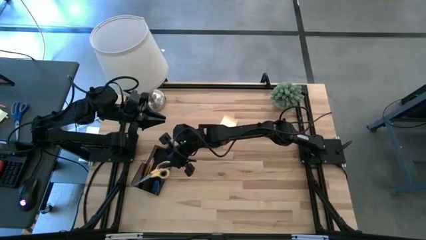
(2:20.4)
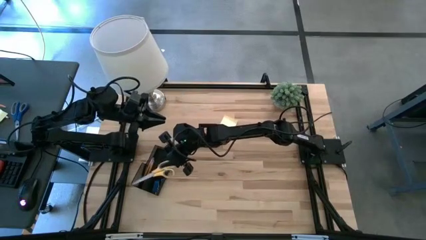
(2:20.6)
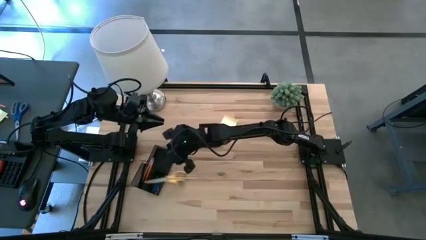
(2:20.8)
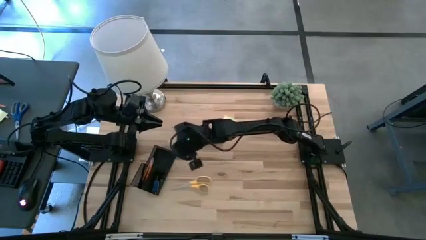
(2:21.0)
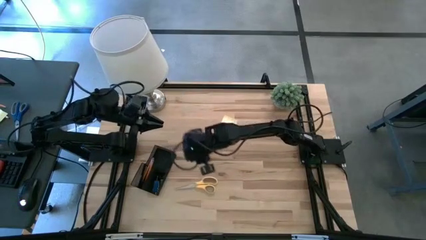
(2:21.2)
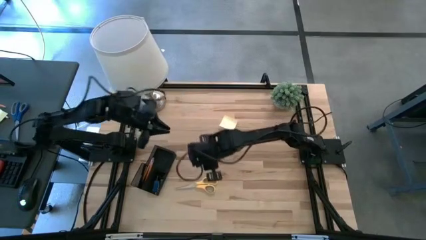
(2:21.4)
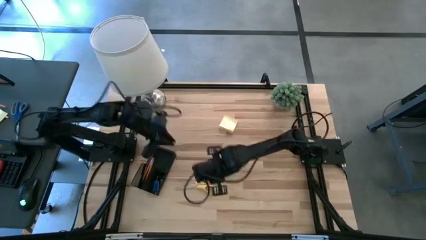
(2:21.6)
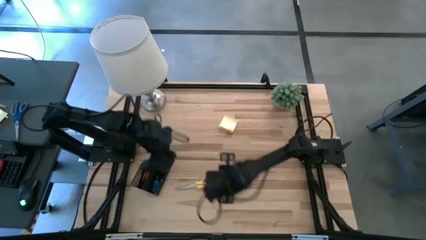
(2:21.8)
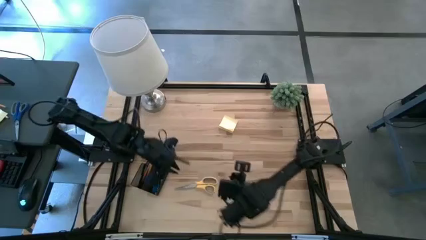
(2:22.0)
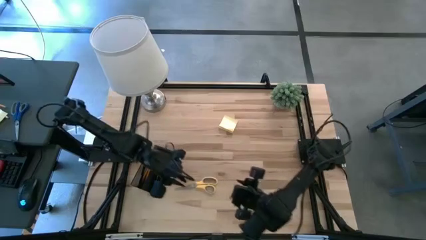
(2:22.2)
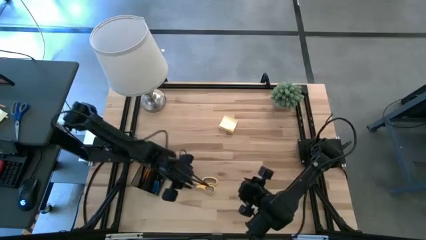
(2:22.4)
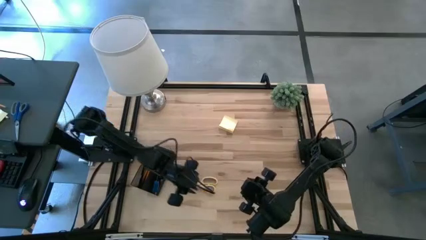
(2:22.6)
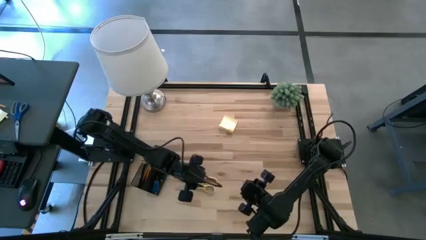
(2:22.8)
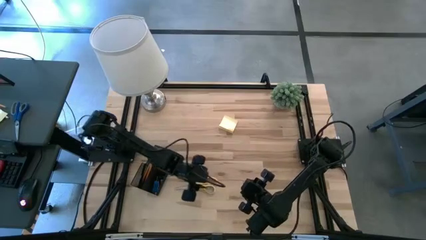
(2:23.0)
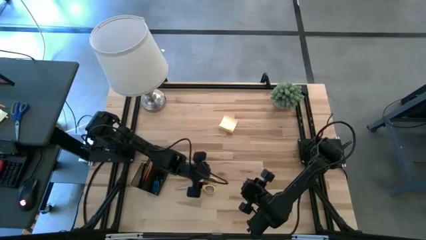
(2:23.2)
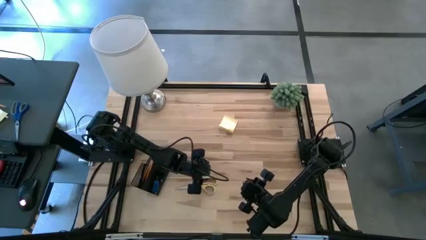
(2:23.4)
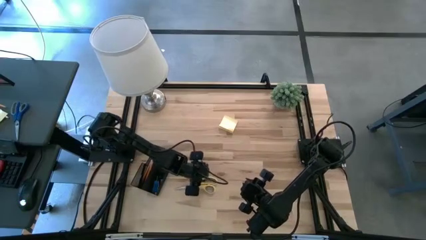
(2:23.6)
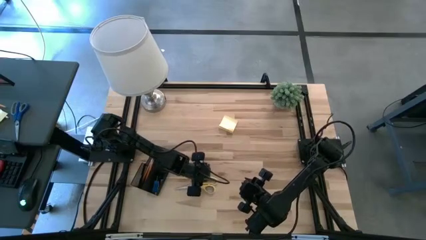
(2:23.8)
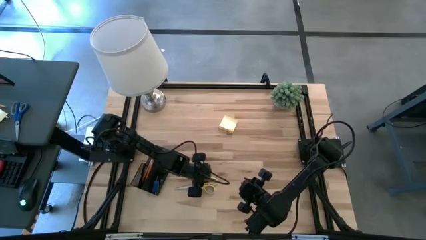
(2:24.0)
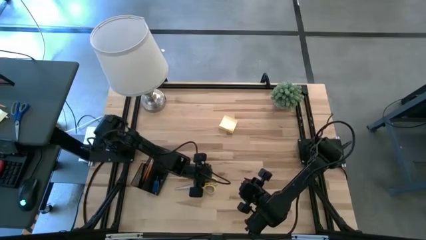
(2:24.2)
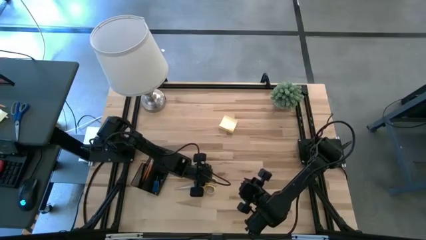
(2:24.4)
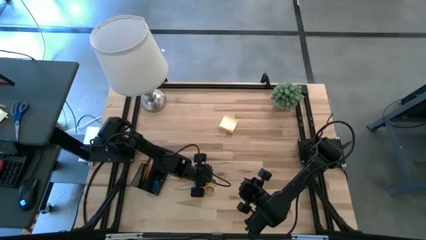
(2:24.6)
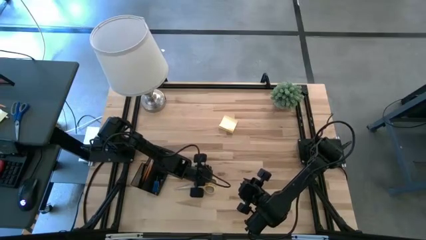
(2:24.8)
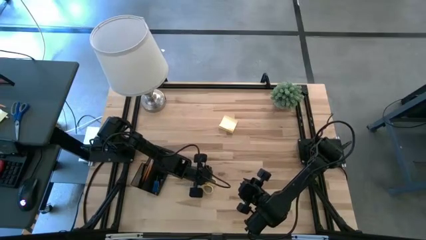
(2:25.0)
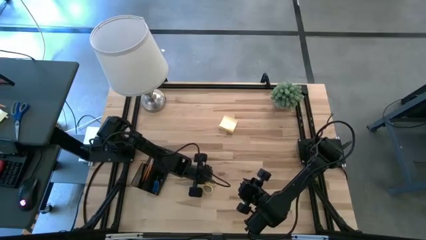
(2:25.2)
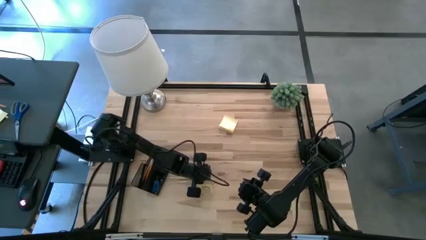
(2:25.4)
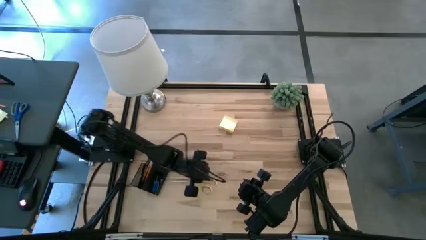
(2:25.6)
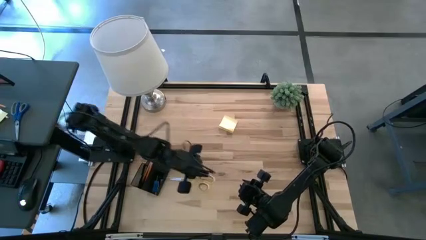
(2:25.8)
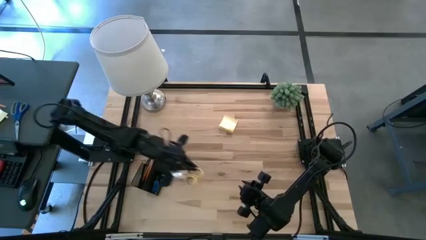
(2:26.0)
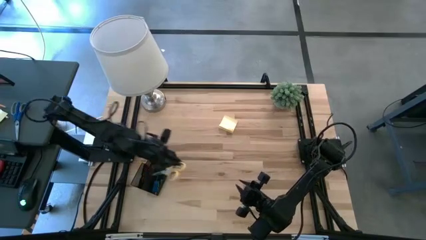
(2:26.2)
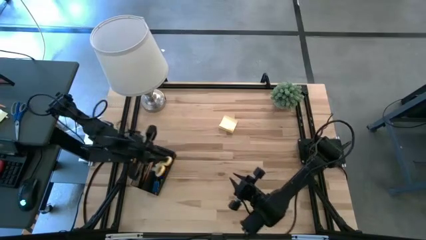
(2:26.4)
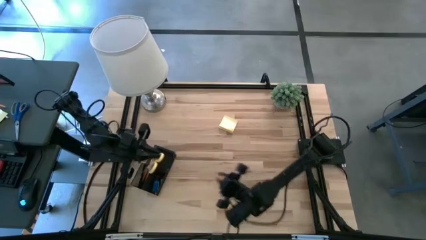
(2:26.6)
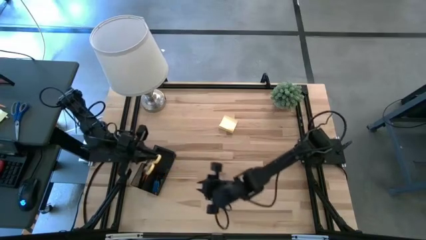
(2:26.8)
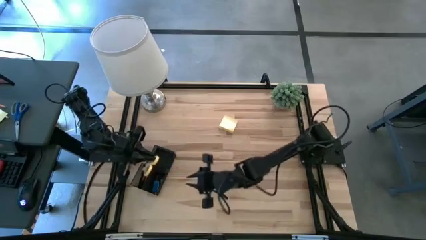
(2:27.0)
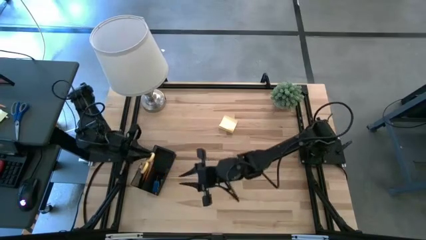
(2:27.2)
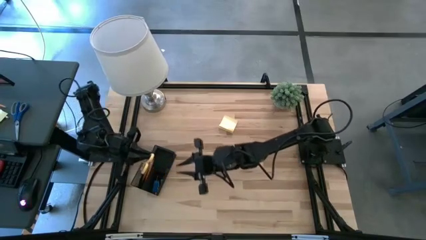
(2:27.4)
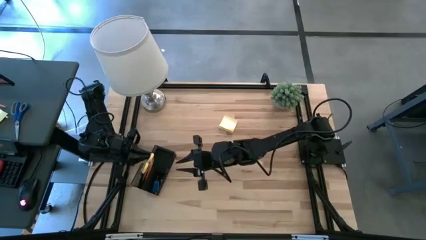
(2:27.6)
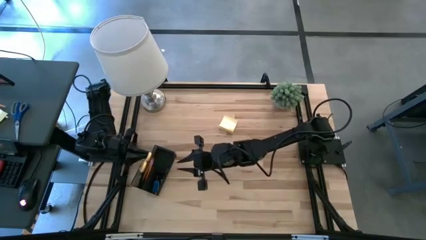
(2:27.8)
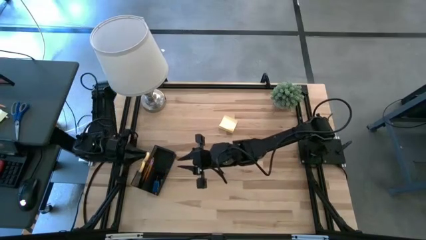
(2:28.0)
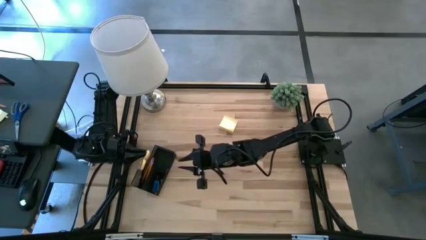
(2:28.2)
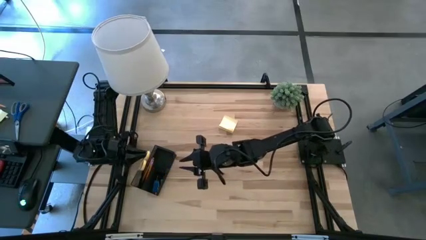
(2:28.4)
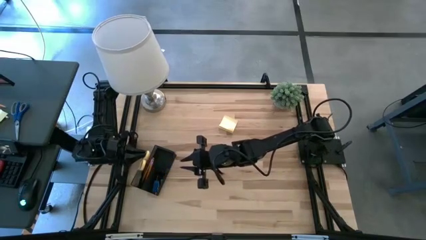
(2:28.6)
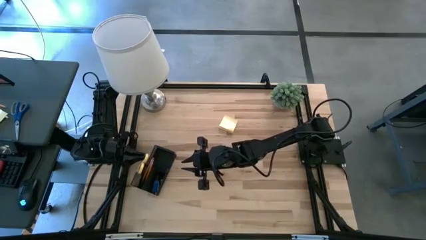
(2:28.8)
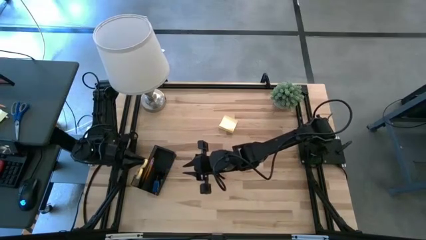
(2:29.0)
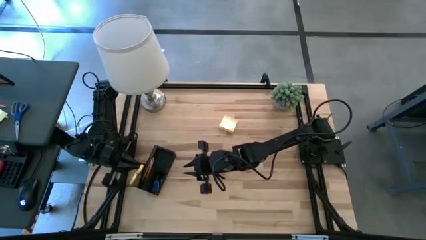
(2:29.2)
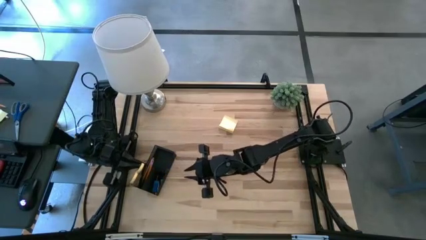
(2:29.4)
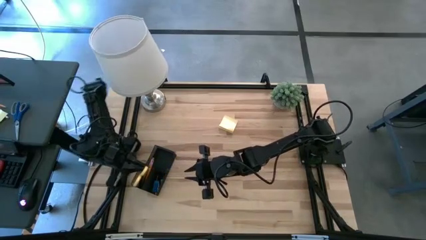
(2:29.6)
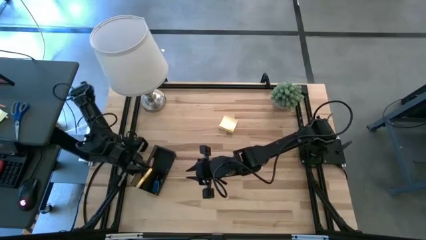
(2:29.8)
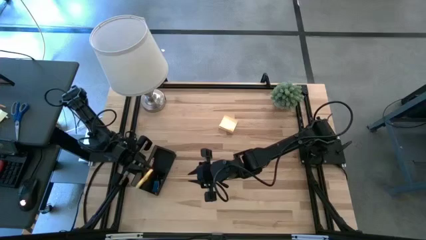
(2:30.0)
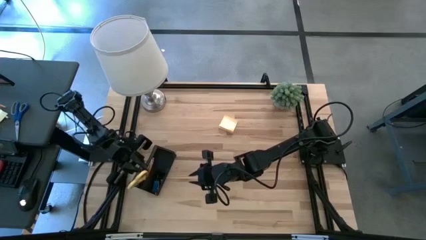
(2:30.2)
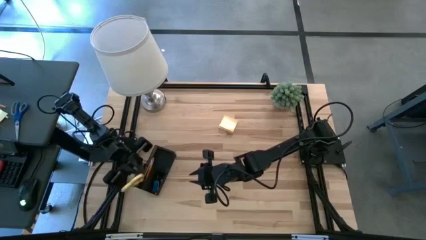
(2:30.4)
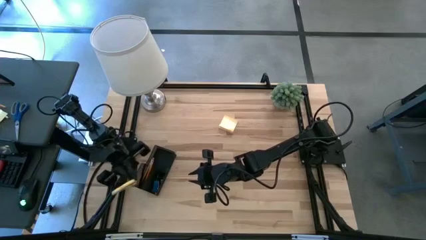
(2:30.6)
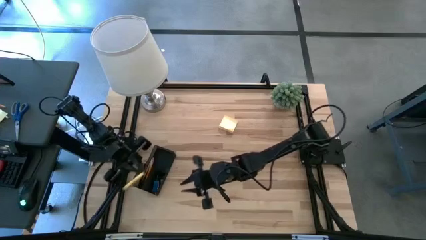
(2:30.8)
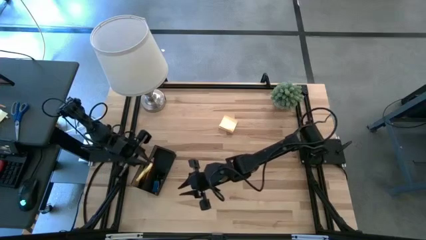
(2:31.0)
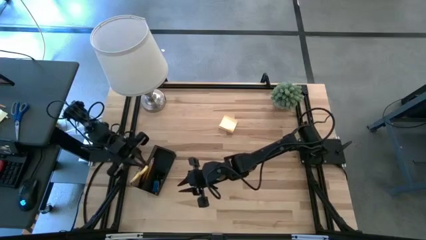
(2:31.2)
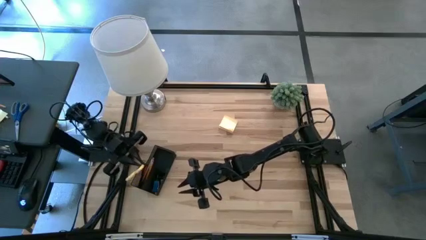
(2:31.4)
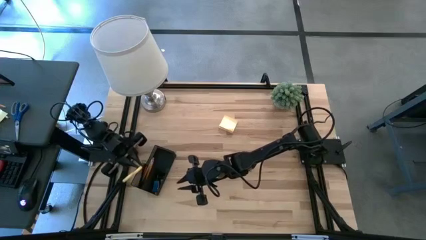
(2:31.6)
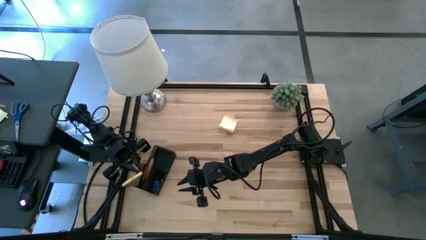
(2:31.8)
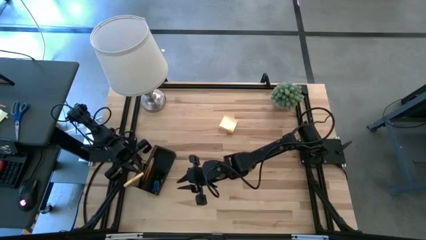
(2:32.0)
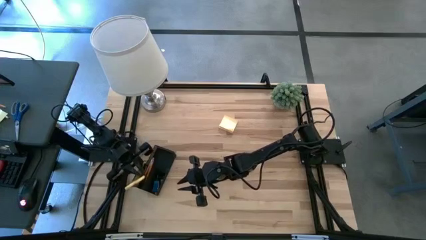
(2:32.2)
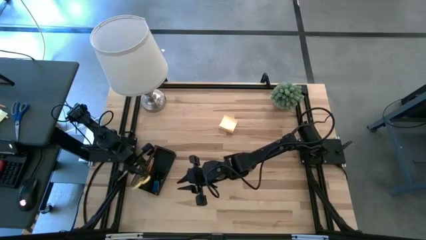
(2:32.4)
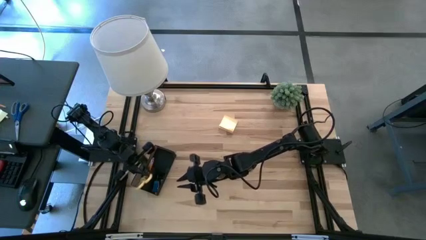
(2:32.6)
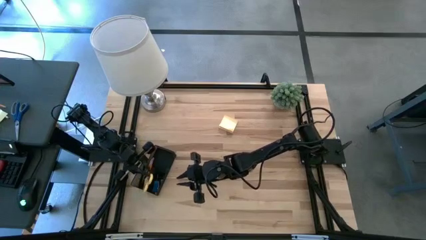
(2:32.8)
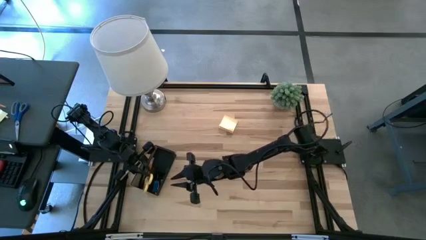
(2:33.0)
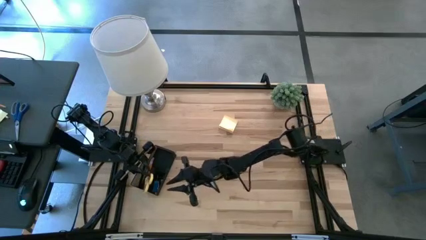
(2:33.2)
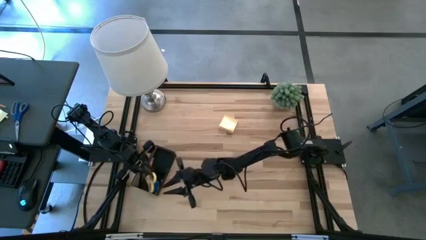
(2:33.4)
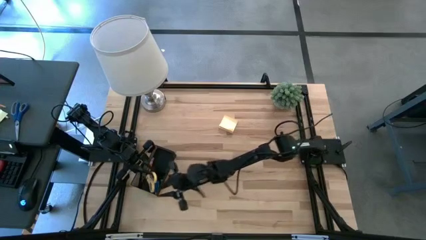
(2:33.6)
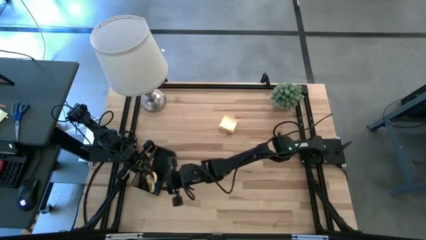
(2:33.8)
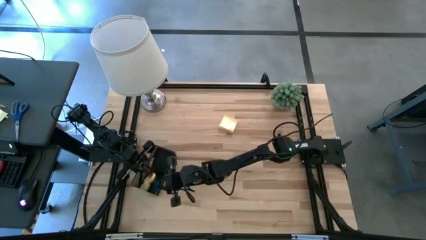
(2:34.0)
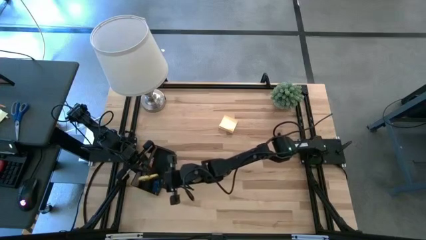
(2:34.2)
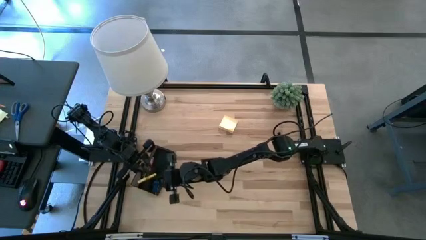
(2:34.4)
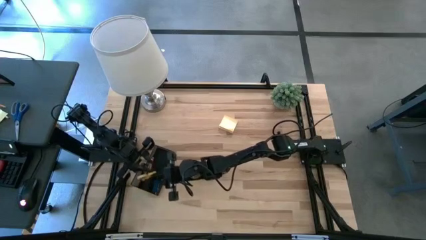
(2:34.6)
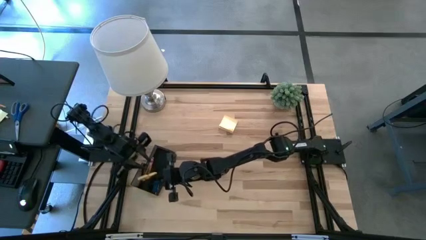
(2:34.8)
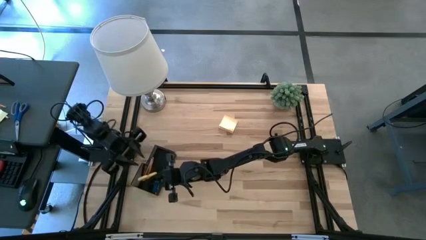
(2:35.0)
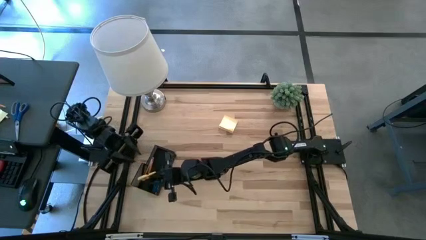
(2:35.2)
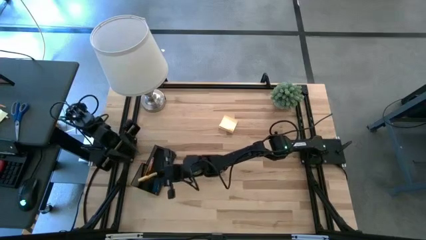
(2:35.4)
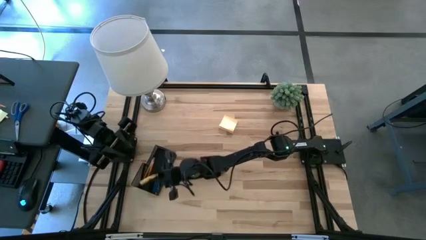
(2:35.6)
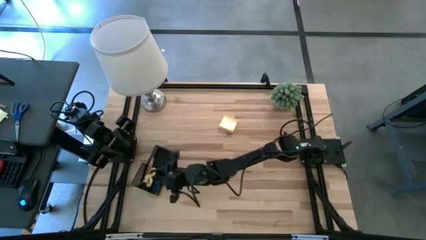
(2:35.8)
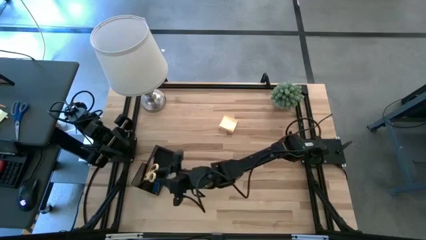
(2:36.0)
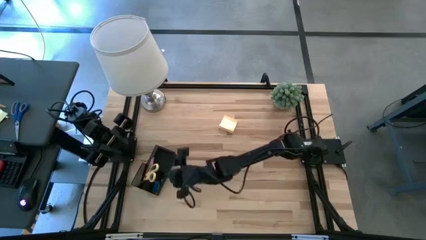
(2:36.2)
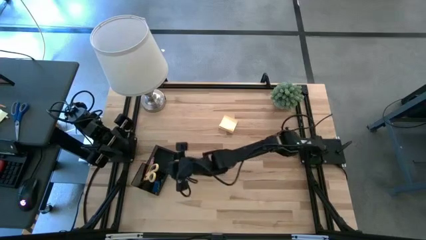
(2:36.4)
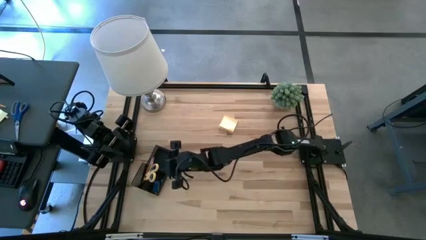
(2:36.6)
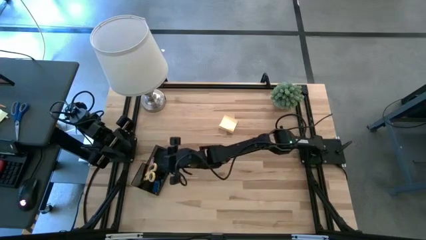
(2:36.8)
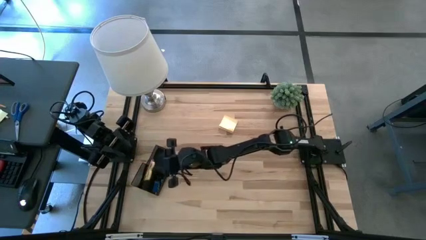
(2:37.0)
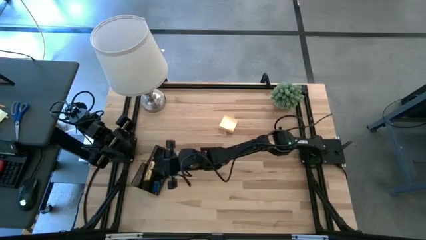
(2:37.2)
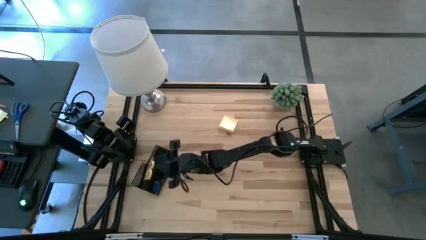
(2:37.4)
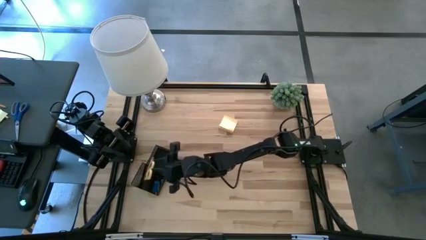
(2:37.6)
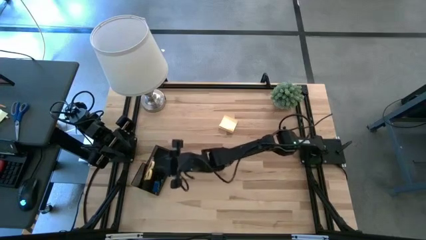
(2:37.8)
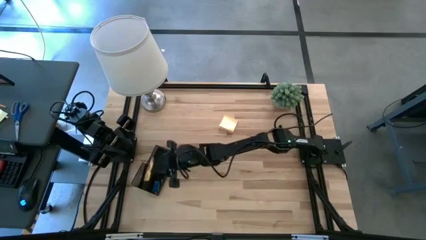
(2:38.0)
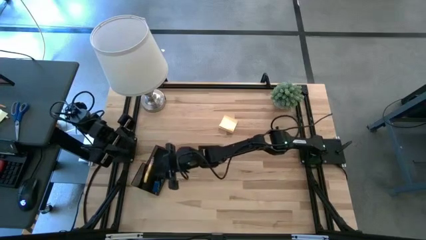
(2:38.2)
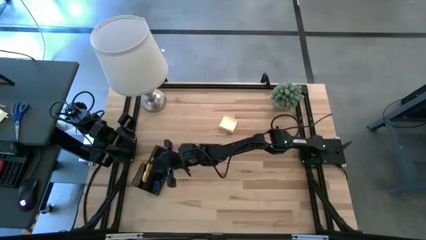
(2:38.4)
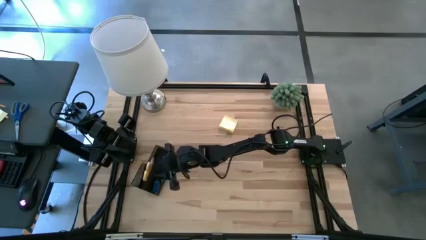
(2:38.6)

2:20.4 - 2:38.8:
Task: Pick and place office supplies into organizer
Put the yellow scissors into the black desk organizer
